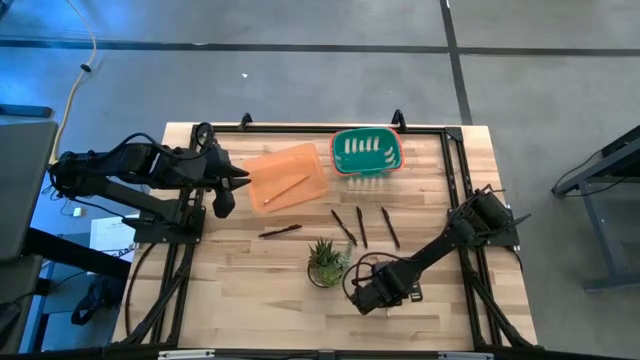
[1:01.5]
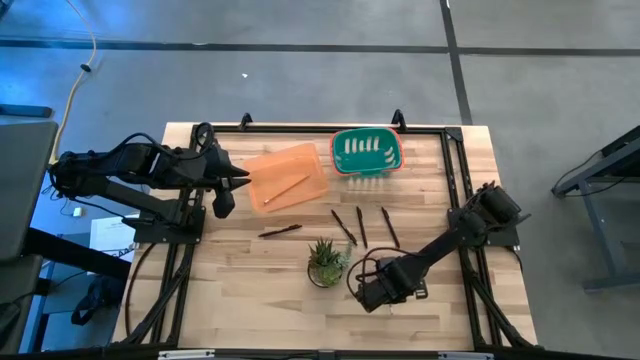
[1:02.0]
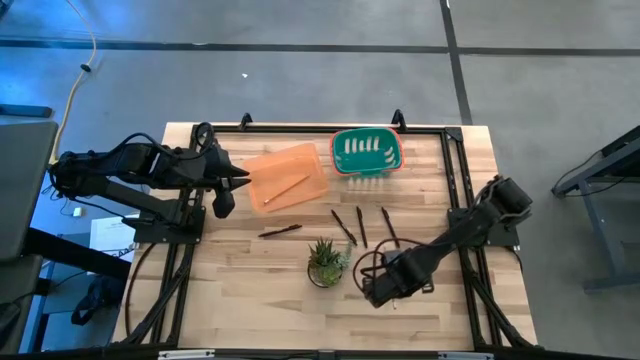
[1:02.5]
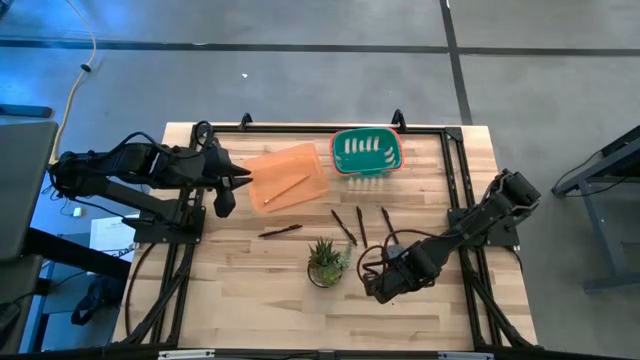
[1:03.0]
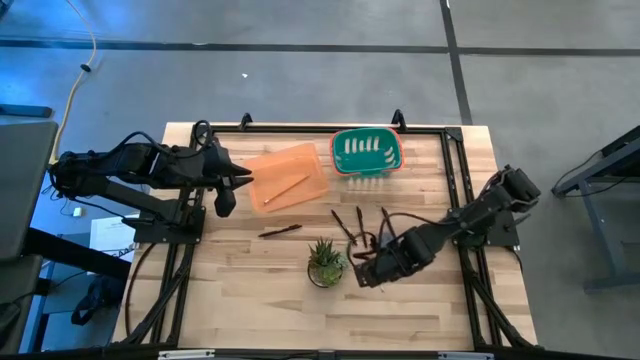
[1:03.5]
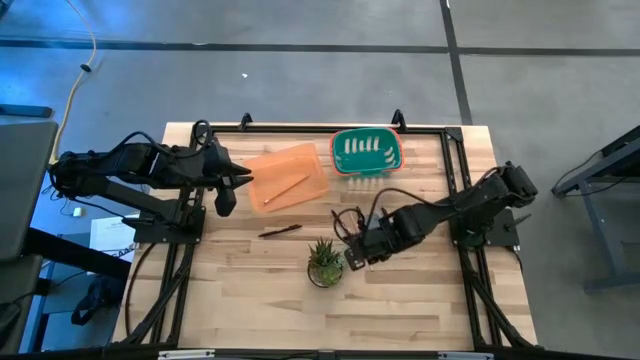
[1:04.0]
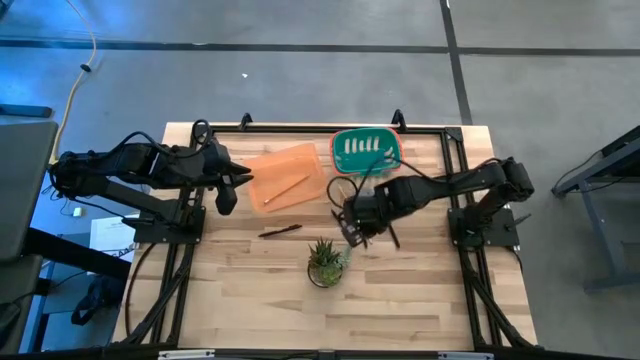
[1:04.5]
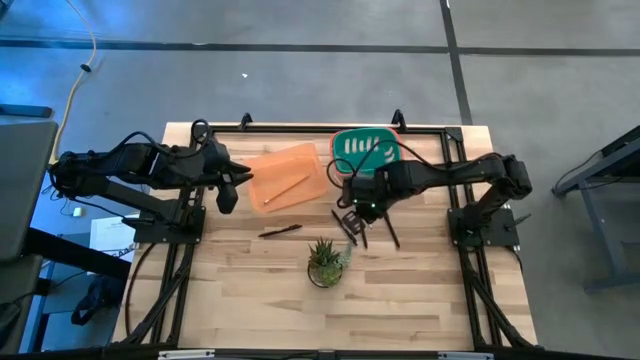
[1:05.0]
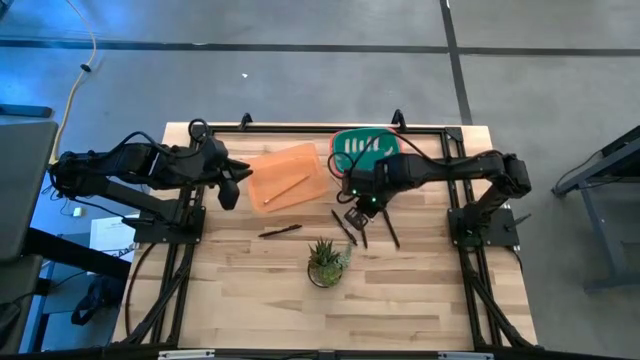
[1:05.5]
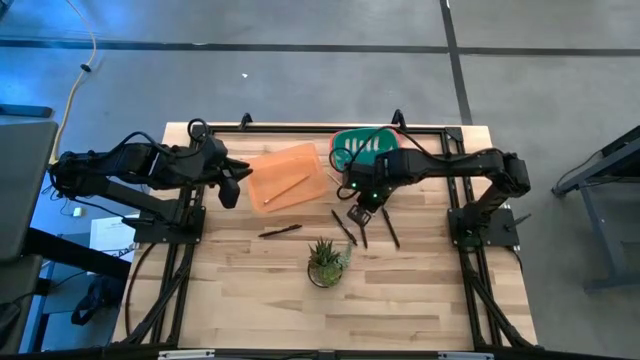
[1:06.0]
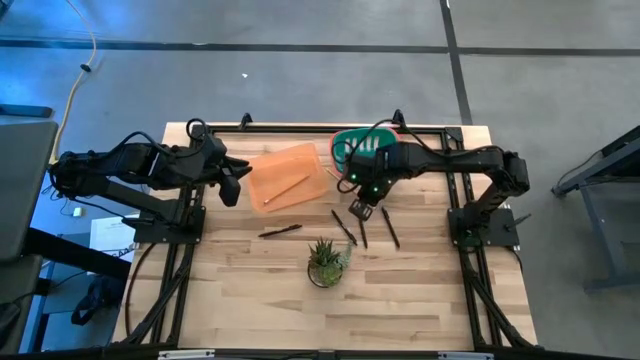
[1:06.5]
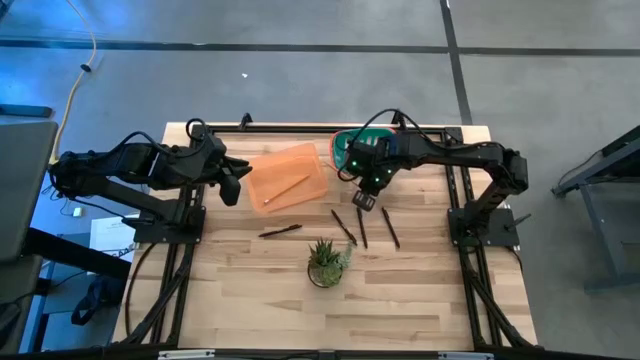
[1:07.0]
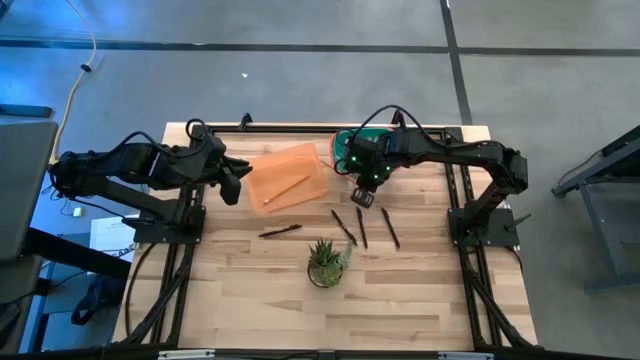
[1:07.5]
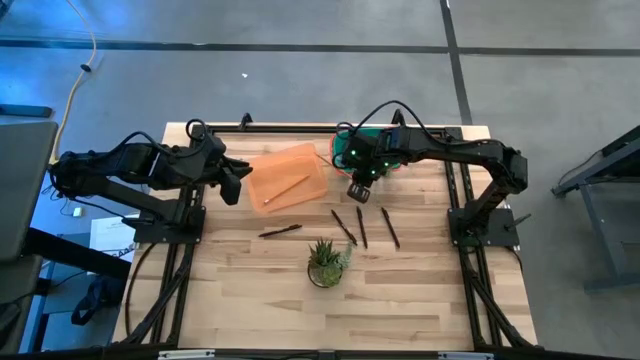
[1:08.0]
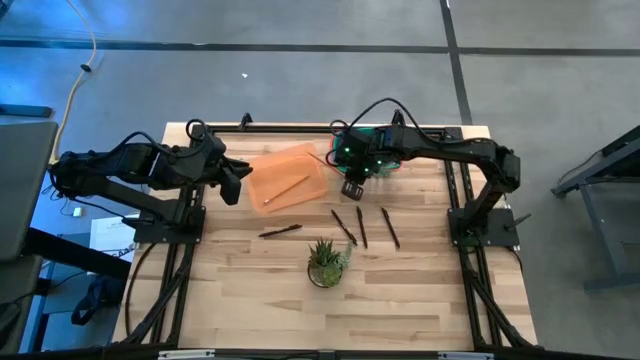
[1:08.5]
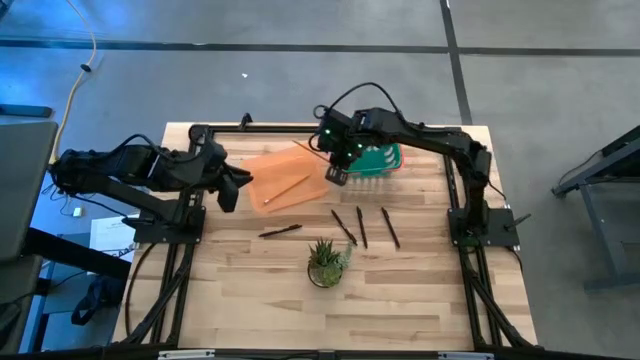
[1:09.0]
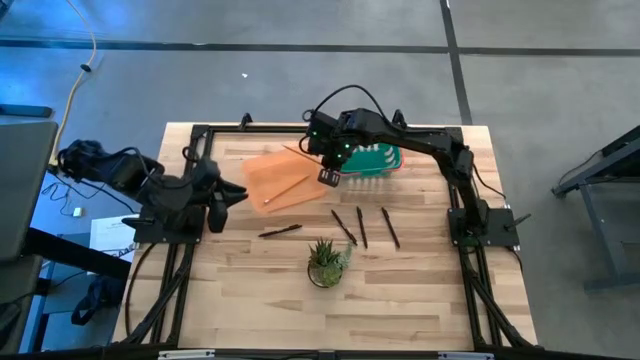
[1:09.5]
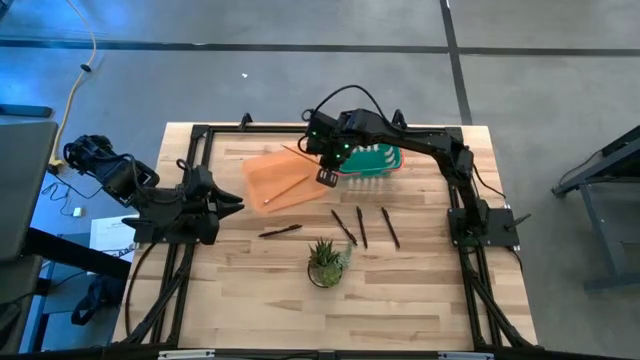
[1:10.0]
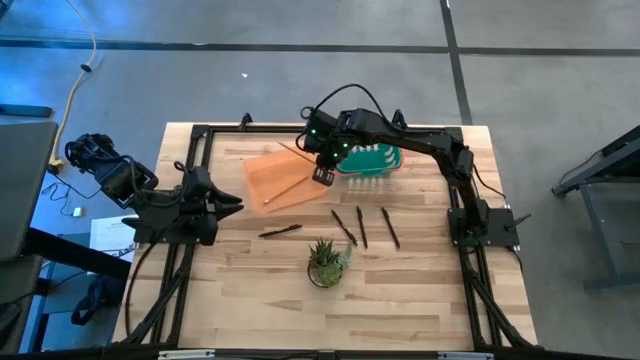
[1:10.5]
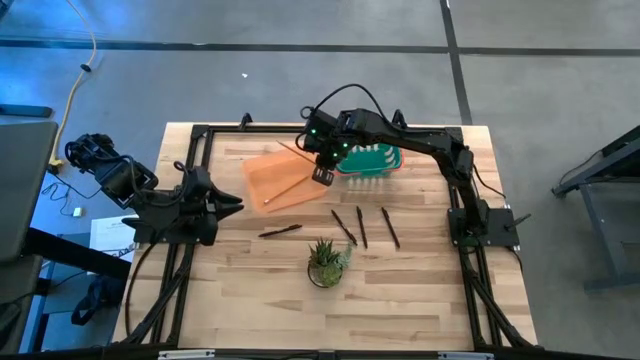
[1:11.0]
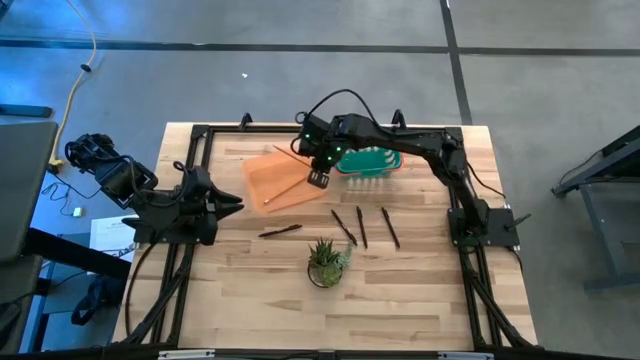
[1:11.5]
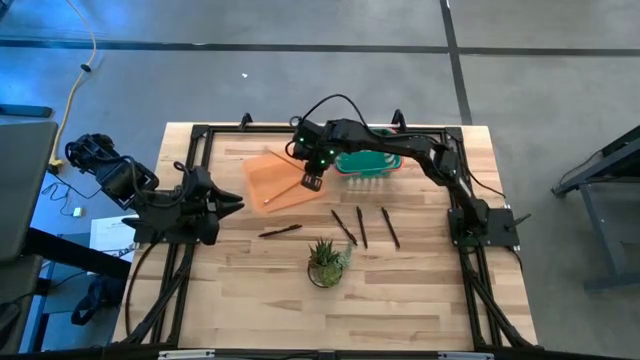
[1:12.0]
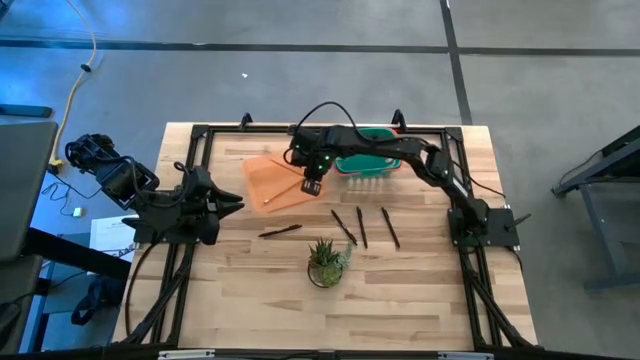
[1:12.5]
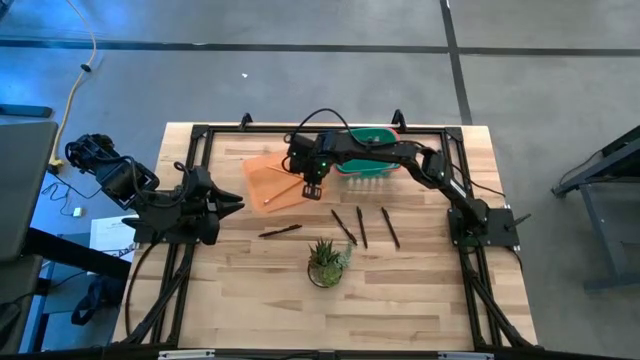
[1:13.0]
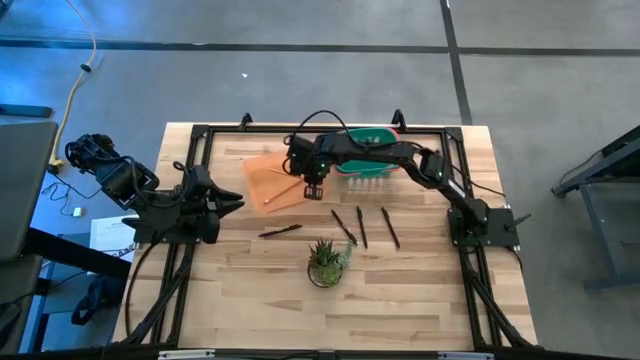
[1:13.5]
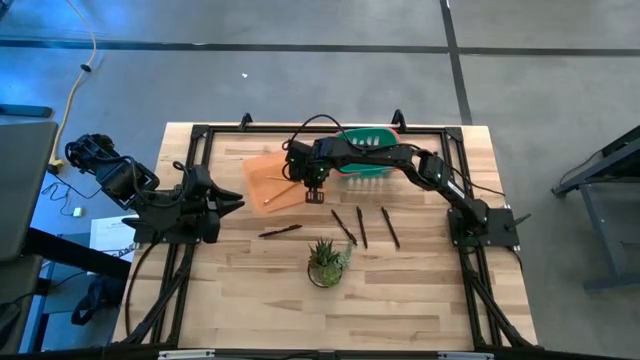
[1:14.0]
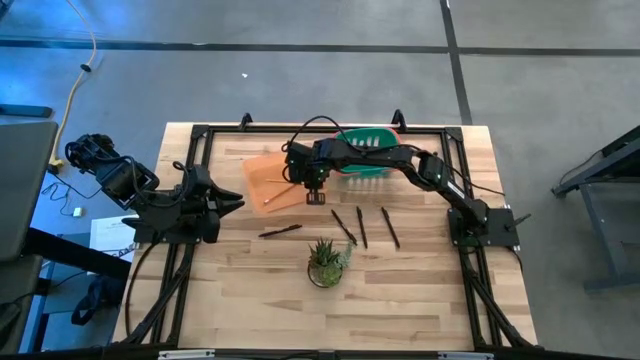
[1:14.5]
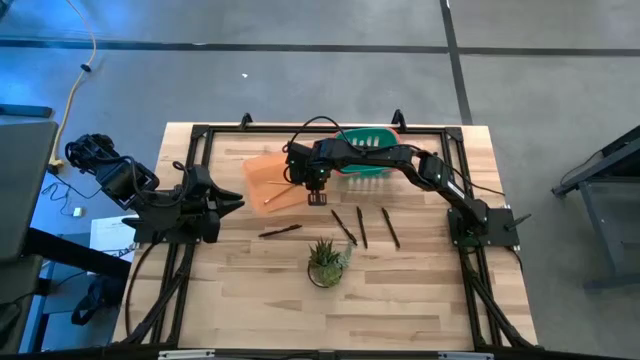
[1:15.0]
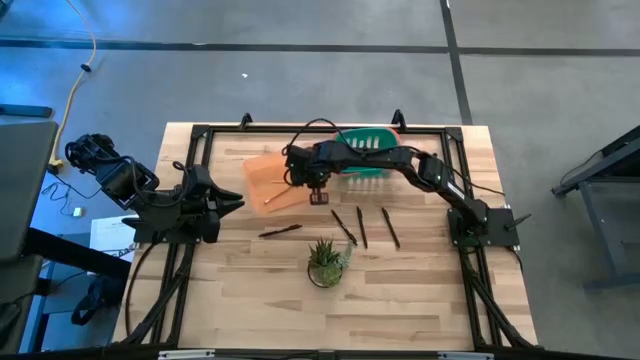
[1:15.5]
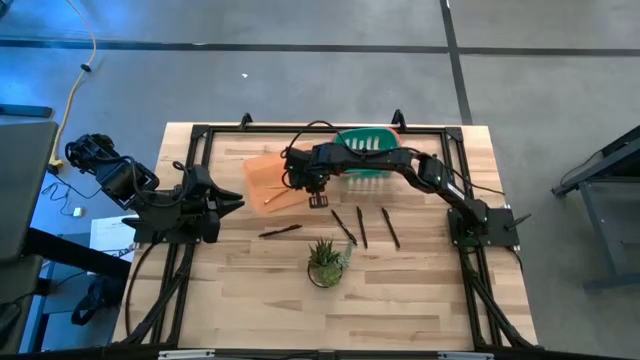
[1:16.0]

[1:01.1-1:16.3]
Task: Sort pens & pencils
Put the orange pencil into the orange bin

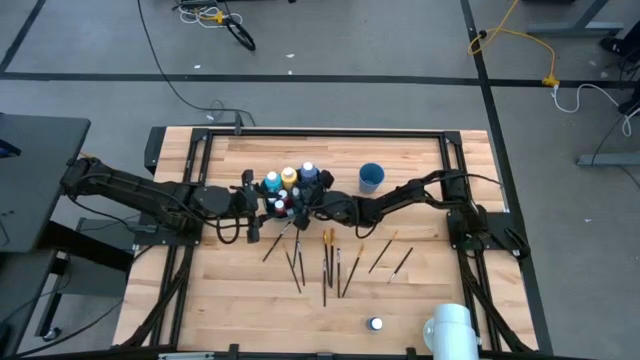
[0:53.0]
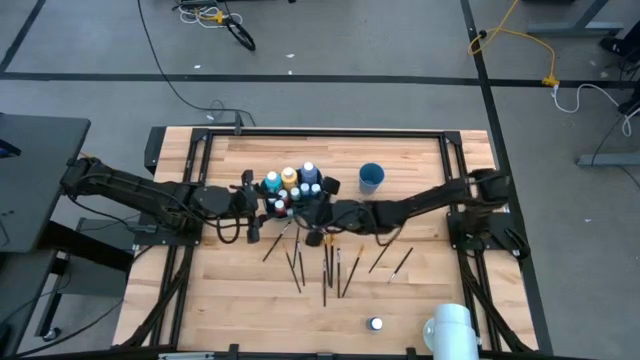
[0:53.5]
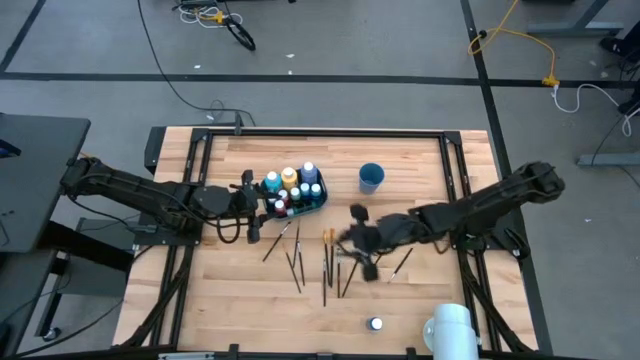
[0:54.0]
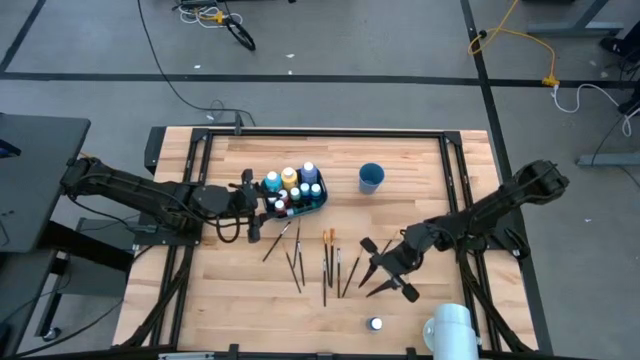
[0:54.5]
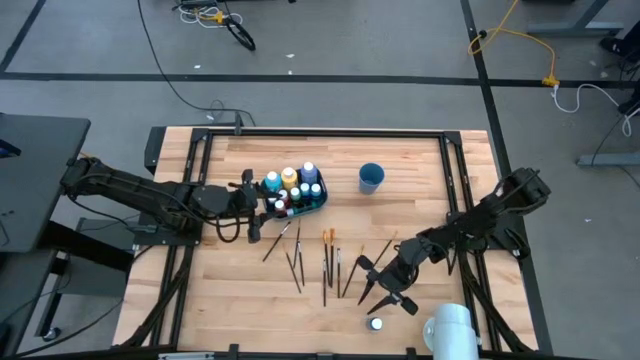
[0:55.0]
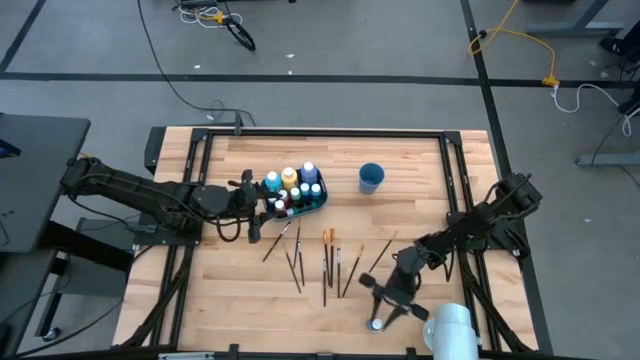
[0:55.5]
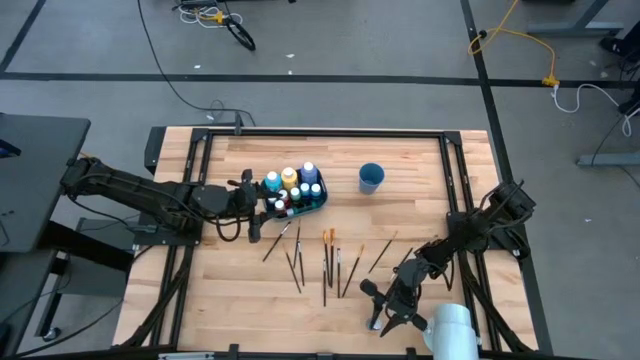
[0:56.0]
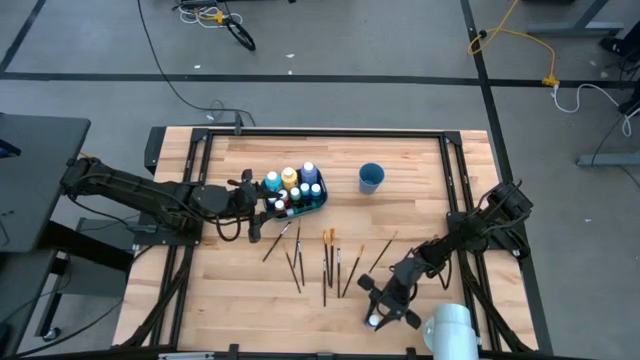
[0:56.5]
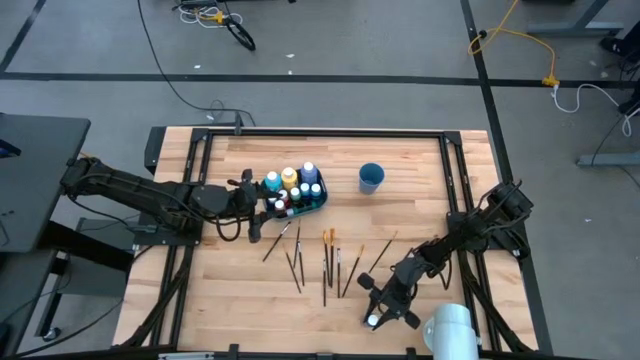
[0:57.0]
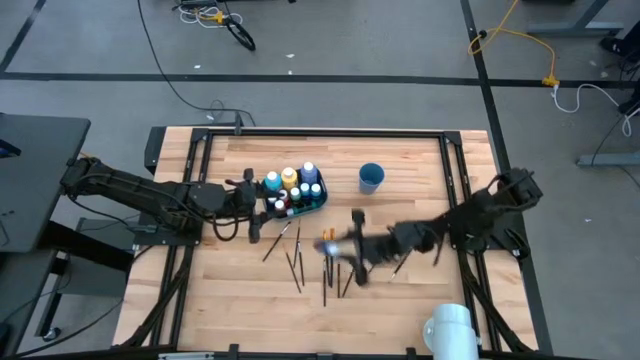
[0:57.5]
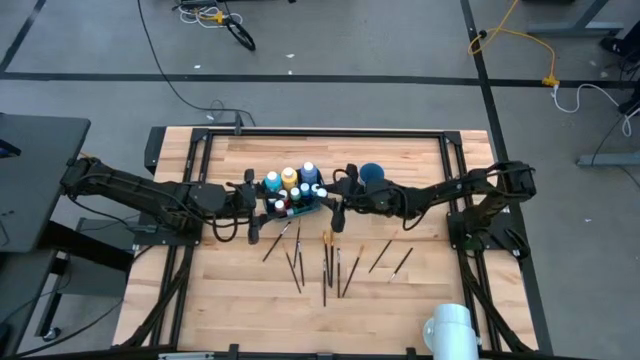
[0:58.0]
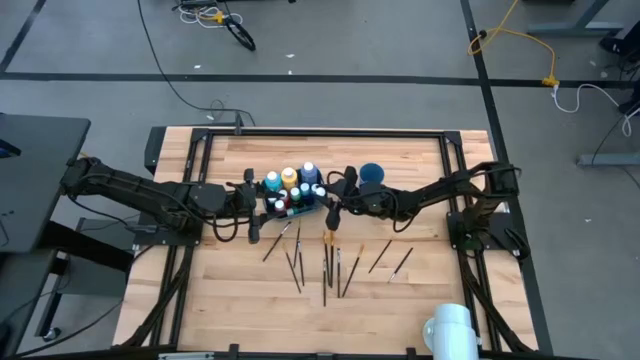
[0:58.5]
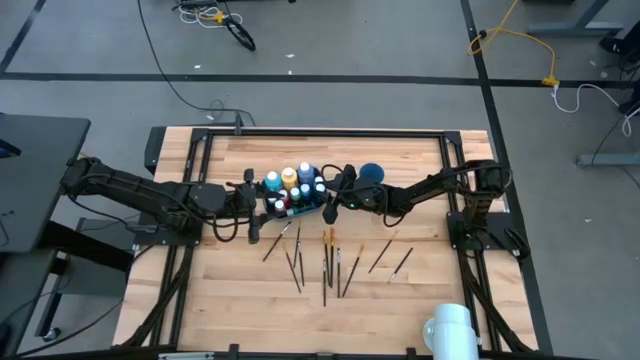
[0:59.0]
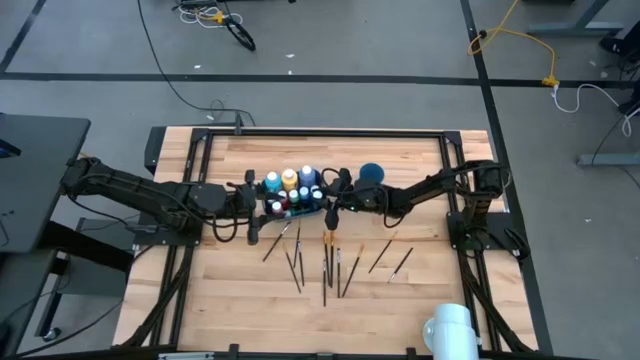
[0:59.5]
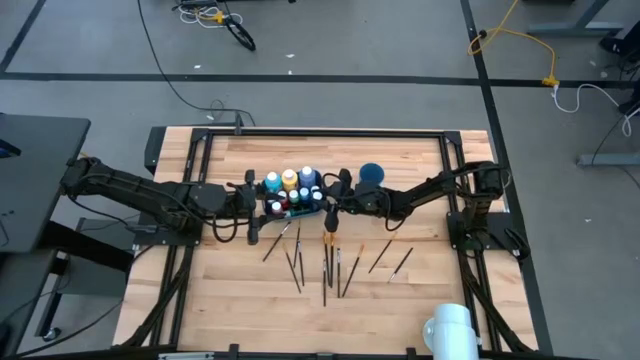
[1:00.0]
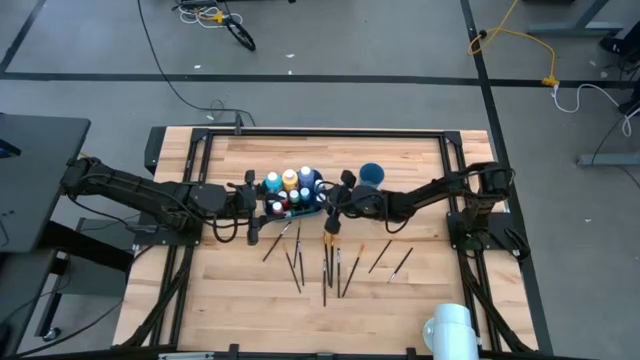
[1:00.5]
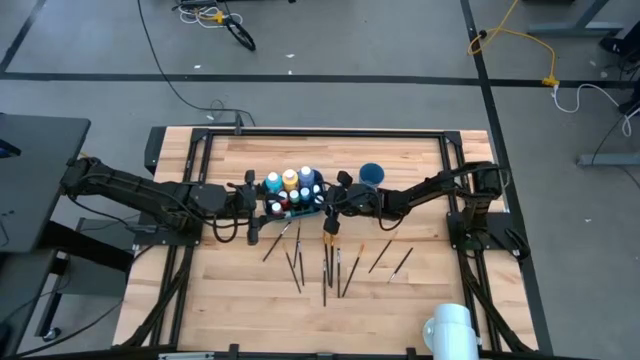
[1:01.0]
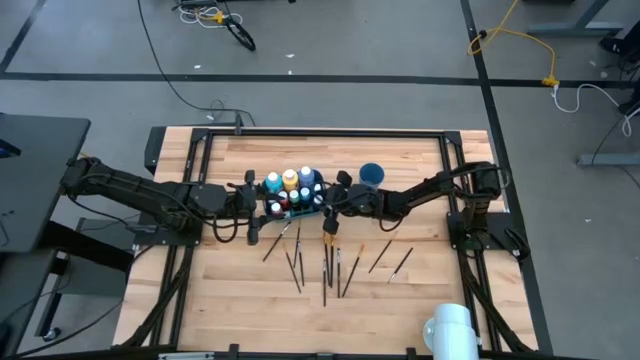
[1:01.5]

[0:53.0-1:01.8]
Task: Pick & Place Paint Supplies
Put the small blue paint bottle into the blue bin
